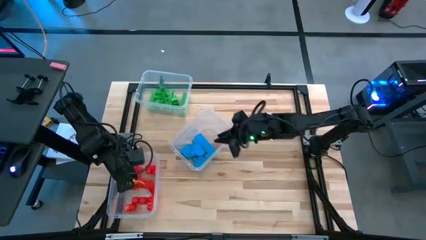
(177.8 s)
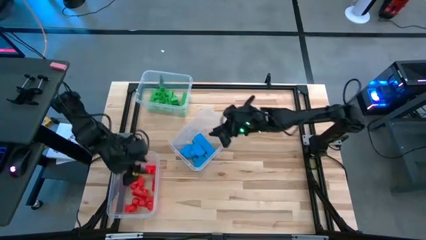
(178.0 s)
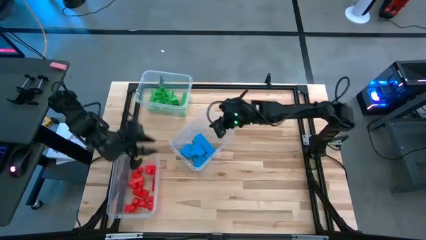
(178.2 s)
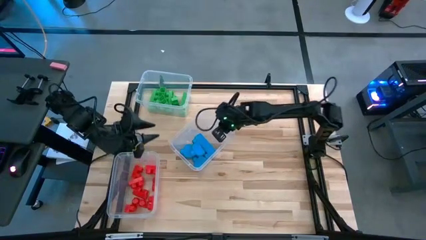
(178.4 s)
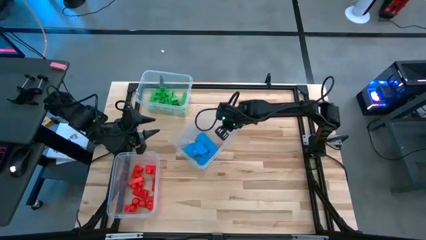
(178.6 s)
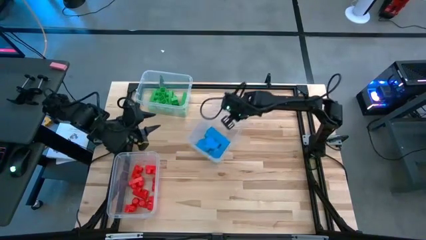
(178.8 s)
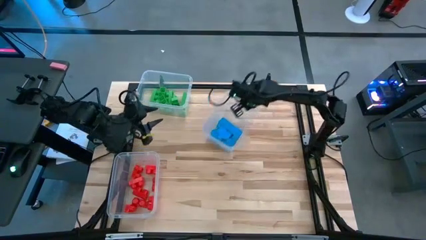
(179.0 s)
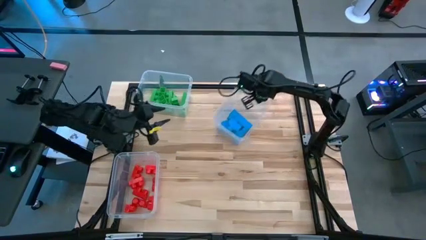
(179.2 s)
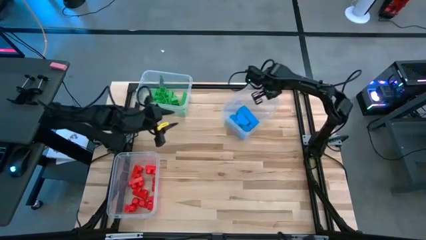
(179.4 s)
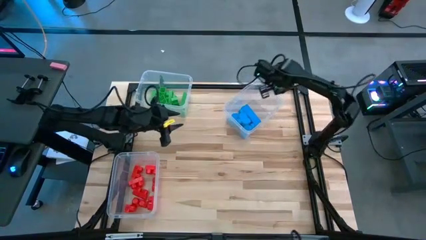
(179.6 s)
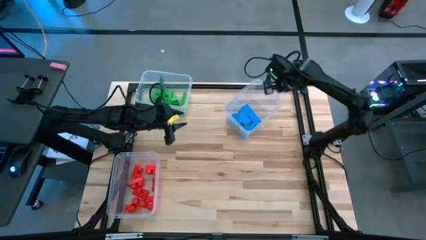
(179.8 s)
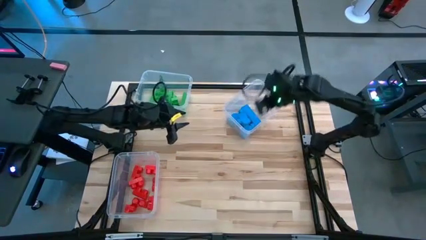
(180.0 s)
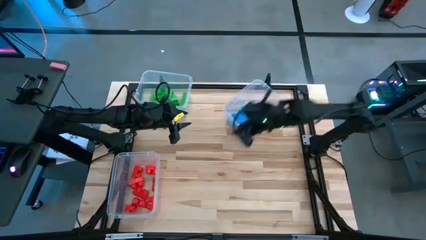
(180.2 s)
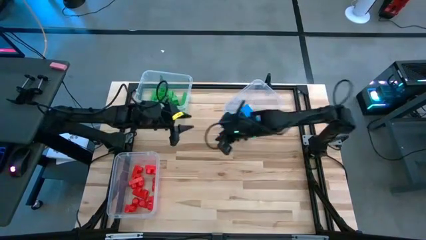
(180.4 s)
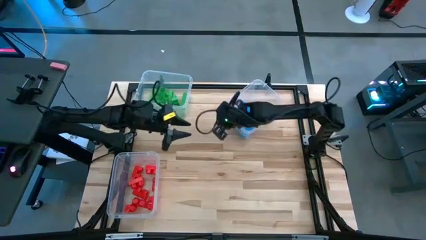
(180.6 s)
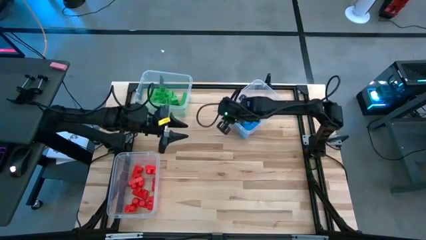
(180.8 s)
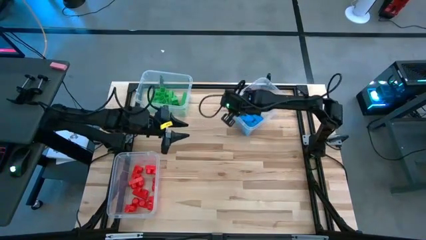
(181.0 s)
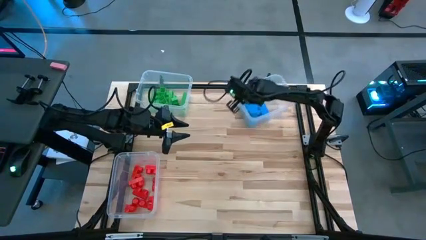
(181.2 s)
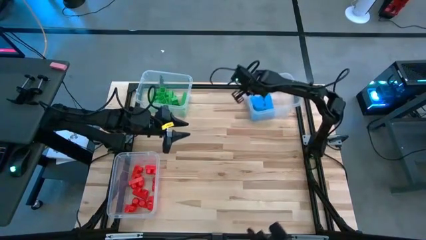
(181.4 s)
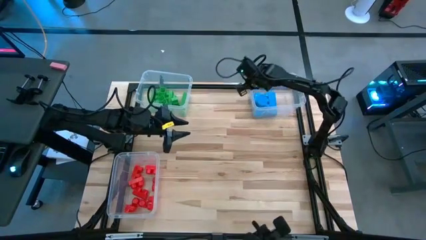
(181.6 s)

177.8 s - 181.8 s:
Task: Sort blocks
Move the center transparent bin to the top right of the table

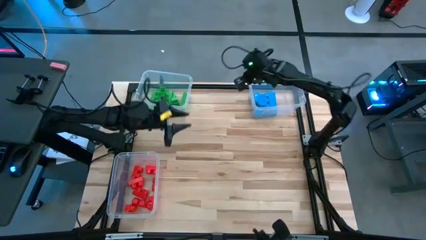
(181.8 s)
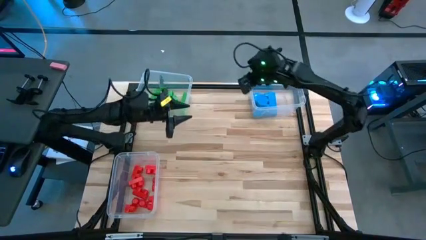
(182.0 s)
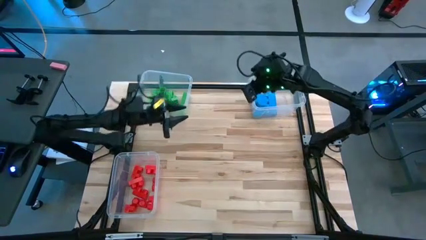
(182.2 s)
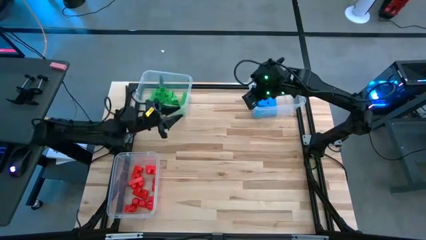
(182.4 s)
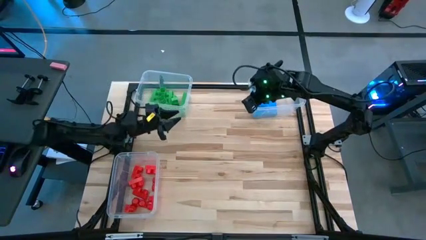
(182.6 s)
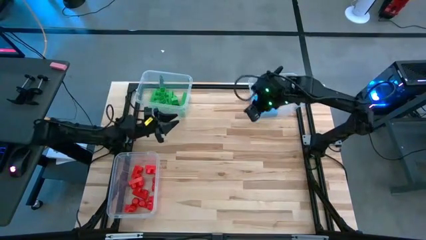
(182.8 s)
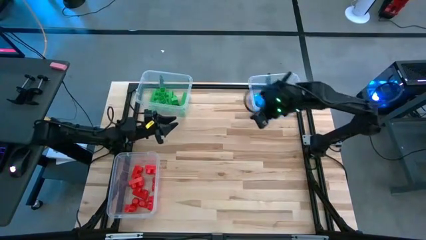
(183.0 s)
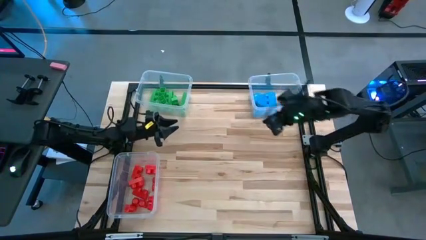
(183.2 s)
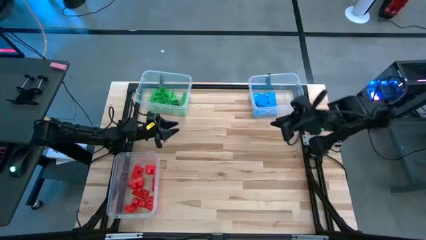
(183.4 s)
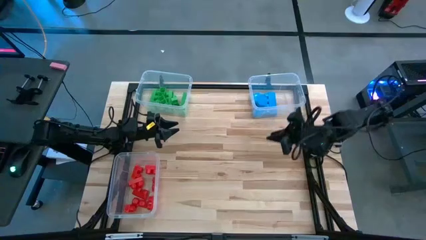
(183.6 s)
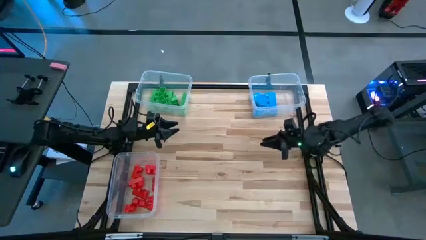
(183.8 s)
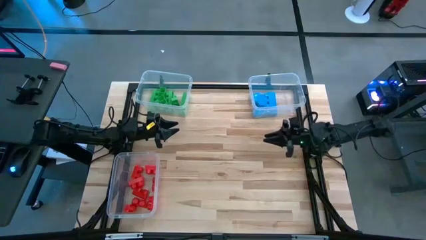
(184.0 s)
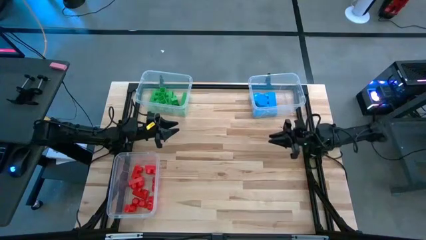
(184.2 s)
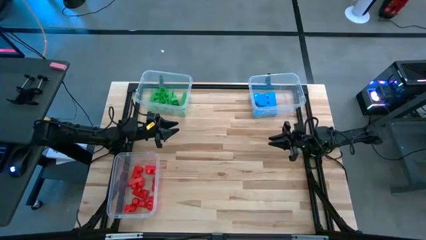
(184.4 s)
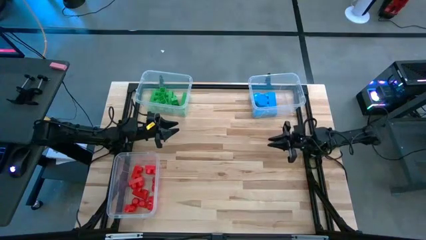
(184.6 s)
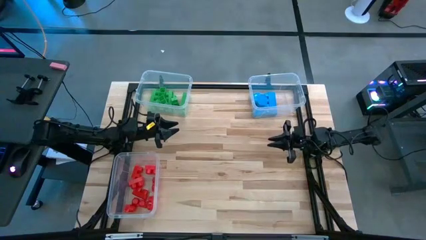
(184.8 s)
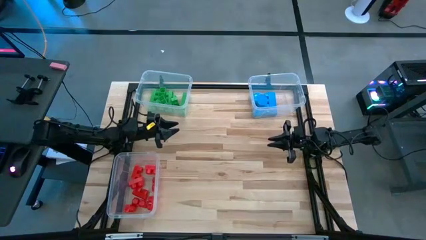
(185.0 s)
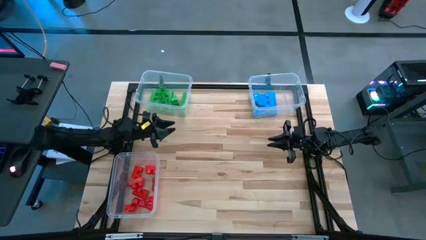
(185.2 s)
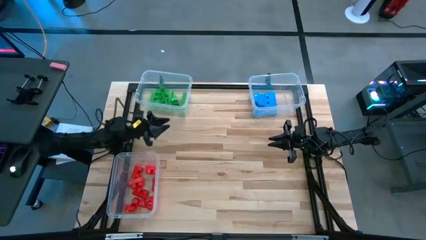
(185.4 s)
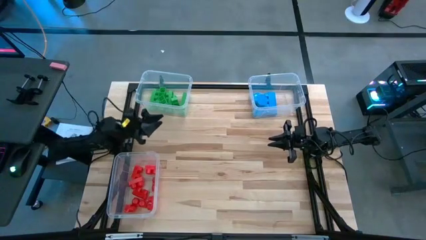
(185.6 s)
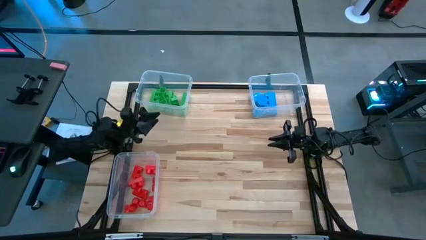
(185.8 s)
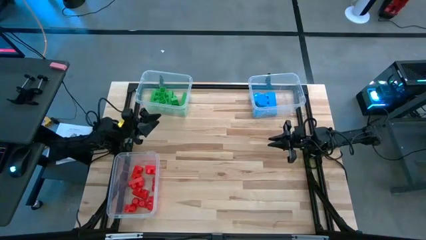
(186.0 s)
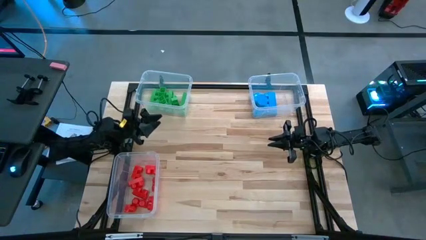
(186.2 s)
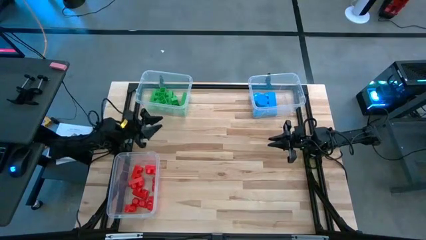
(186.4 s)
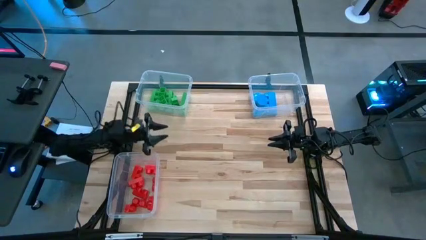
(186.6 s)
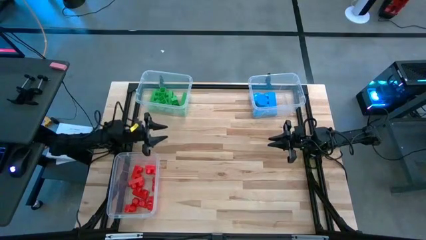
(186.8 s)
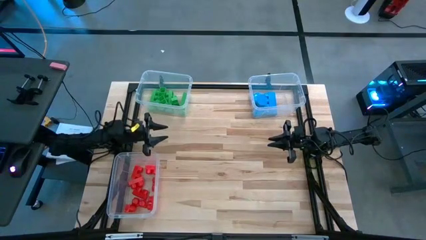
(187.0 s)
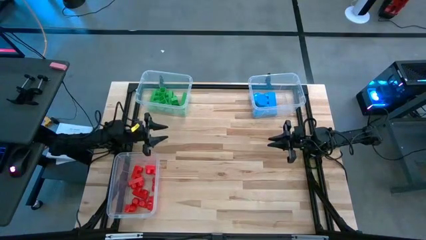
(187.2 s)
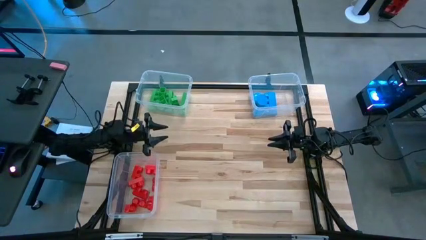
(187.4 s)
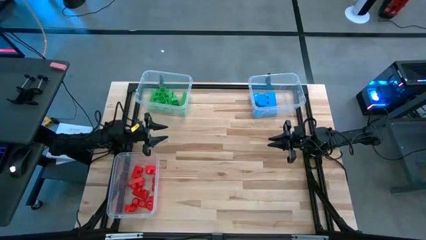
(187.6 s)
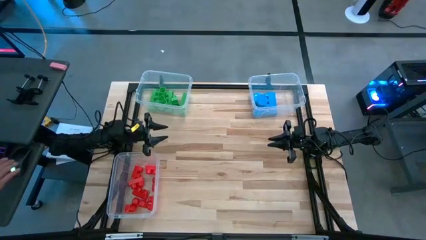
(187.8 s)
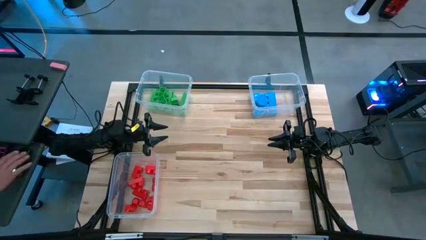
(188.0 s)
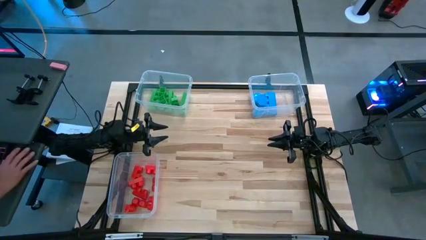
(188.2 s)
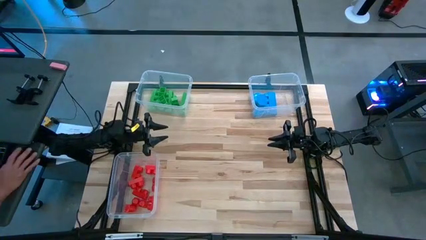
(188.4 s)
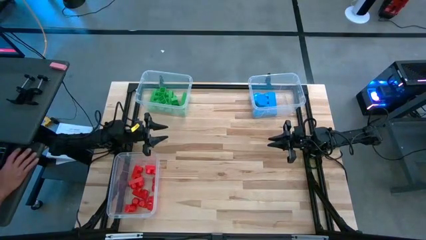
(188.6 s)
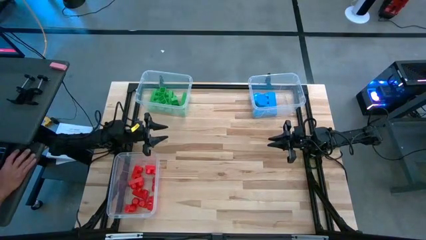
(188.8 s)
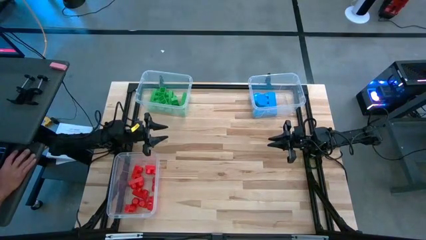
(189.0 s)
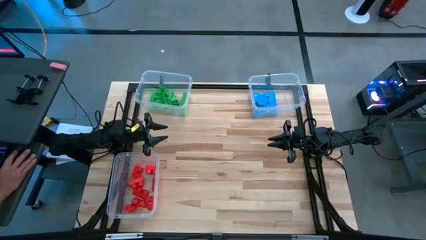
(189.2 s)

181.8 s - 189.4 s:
Return to Home Position

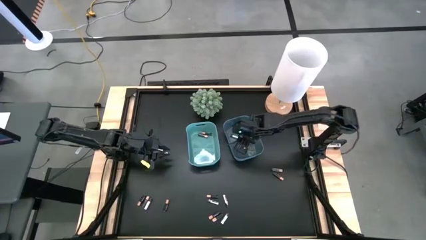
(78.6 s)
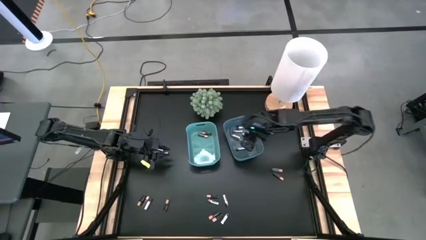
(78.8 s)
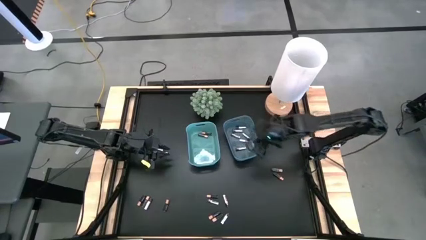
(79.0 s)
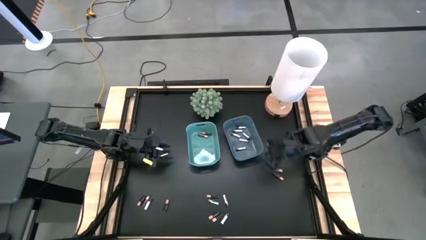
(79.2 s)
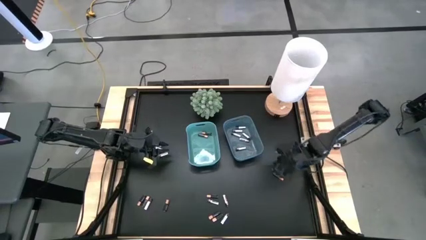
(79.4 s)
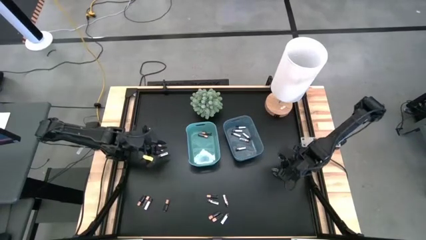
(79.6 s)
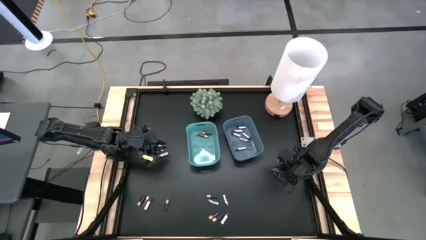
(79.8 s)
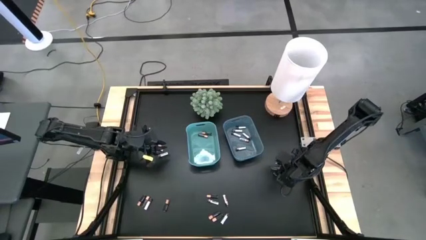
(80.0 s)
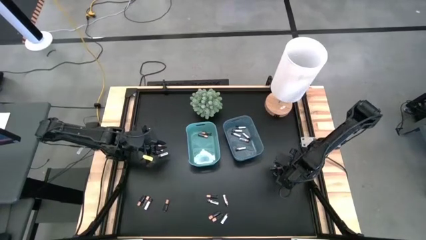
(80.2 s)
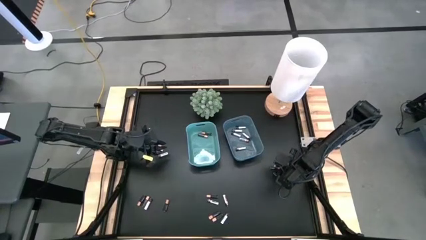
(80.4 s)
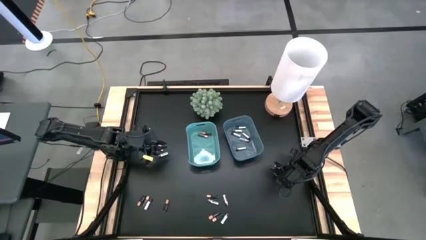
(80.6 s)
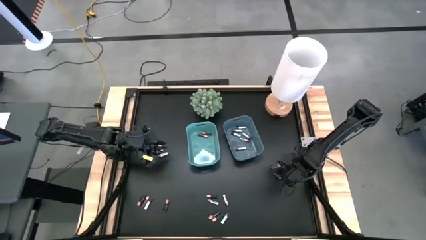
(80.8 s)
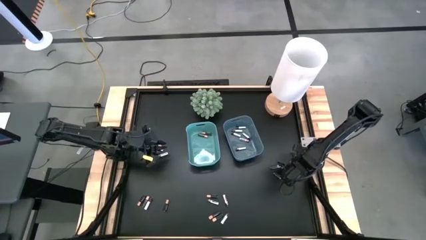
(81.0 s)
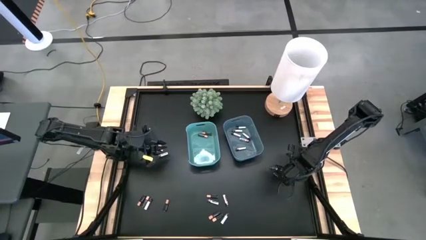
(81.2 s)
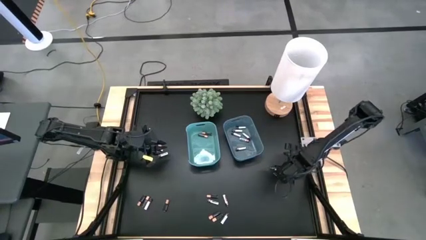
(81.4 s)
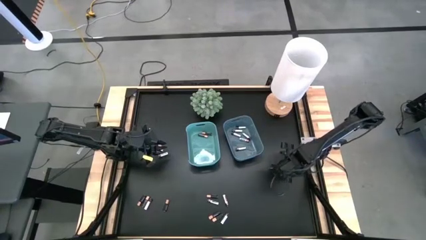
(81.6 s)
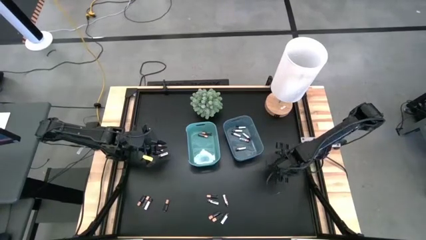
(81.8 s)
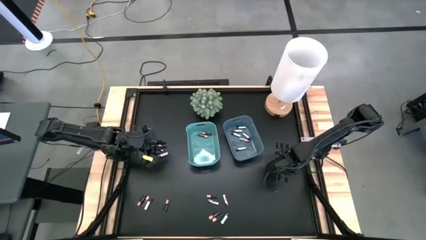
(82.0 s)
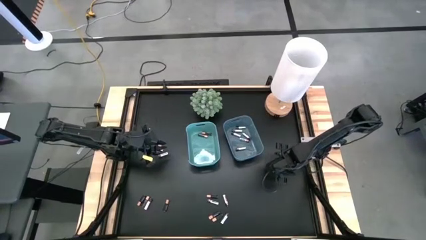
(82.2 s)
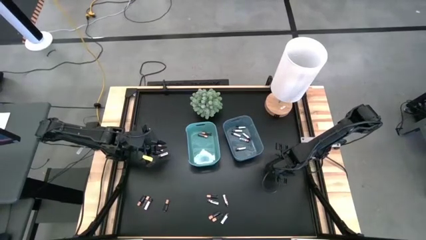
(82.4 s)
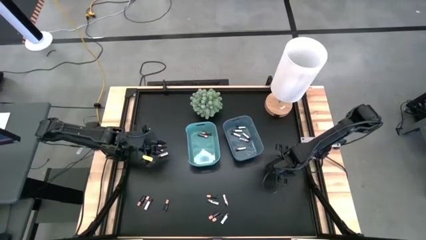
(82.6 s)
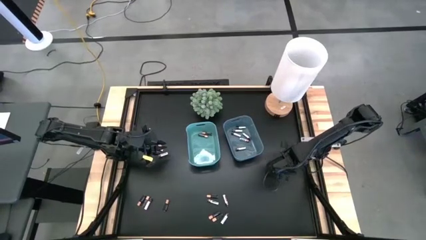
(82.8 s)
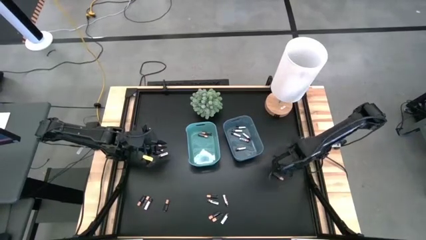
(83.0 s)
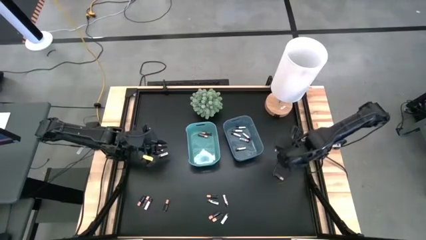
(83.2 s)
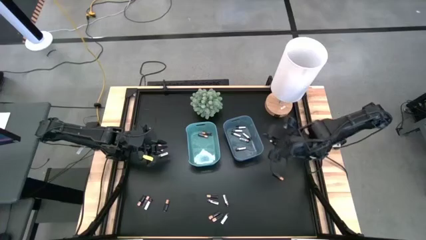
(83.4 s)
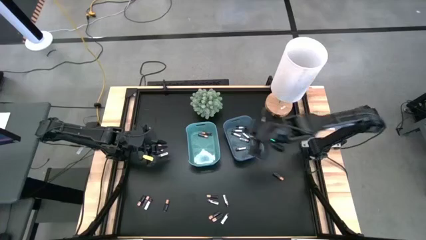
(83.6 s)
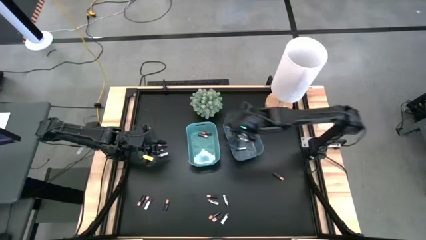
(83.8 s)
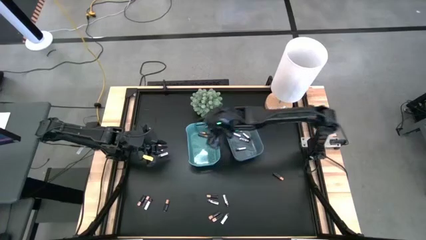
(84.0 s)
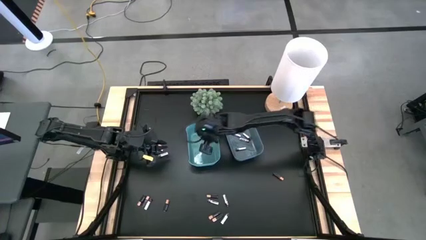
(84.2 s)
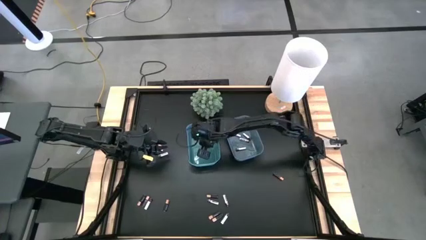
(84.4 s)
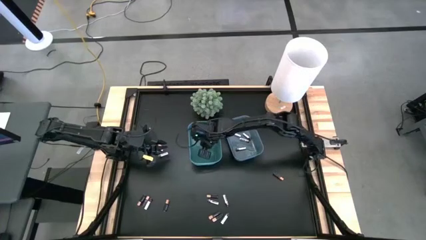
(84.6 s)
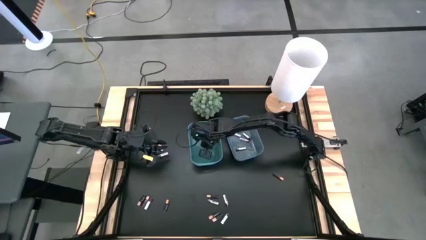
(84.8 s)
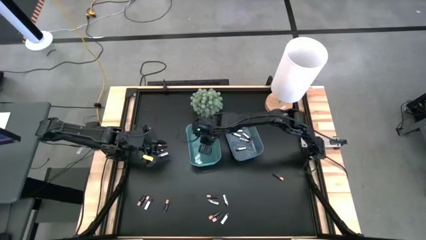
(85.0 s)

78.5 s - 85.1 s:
Task: Sort batteries
Put the black battery into the green bin
